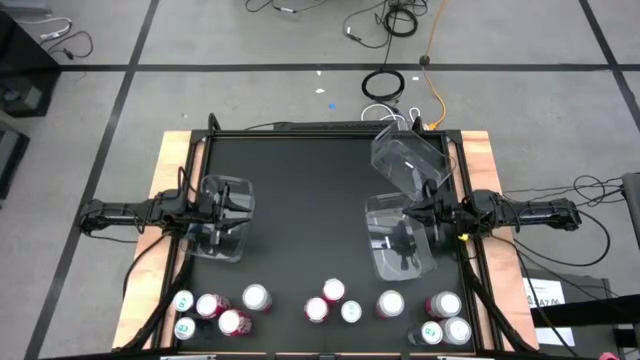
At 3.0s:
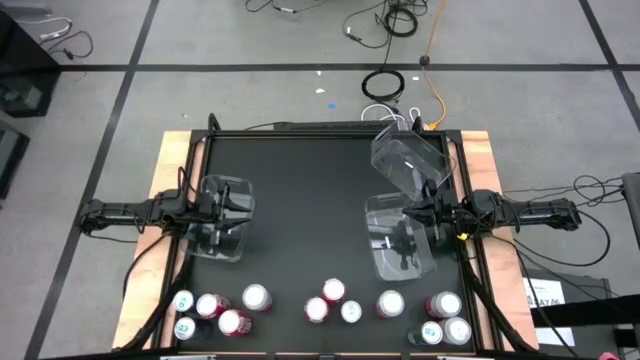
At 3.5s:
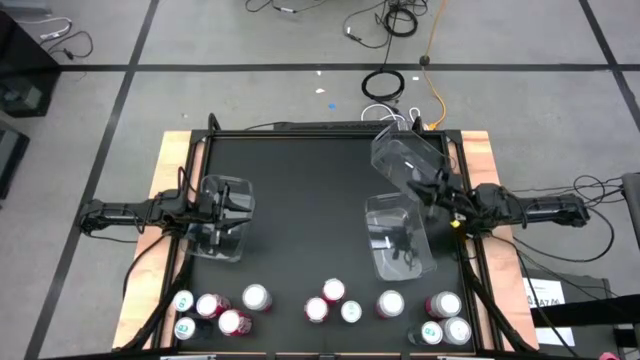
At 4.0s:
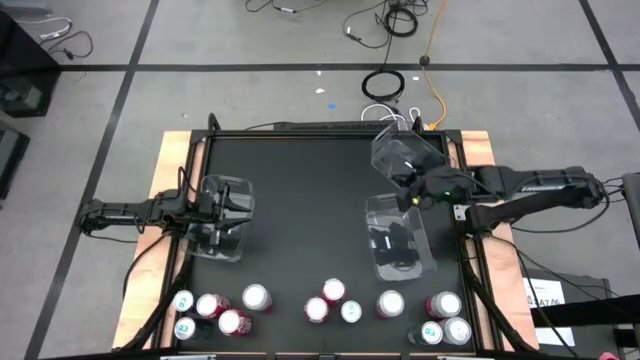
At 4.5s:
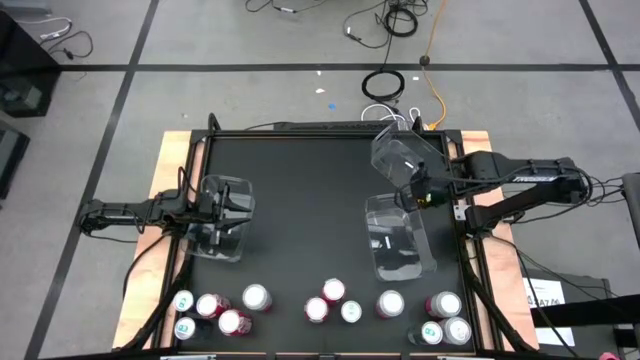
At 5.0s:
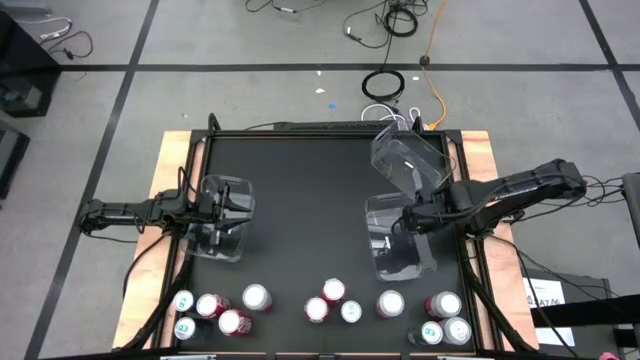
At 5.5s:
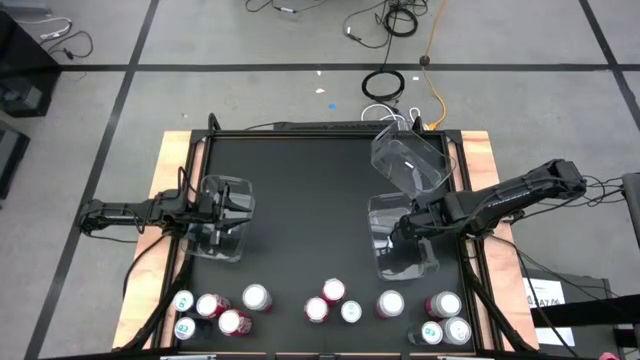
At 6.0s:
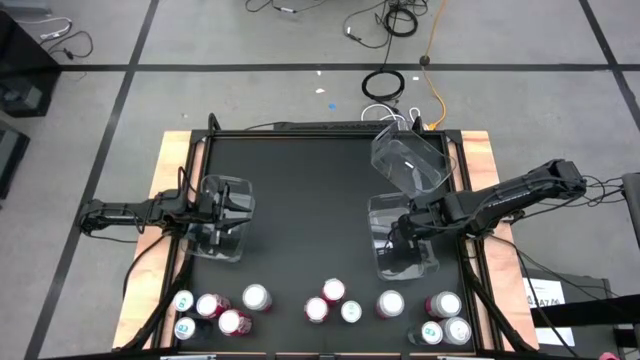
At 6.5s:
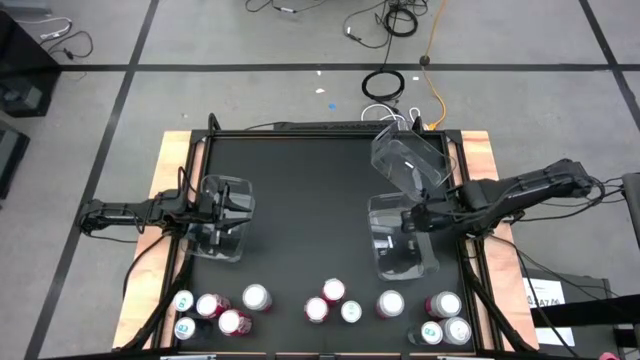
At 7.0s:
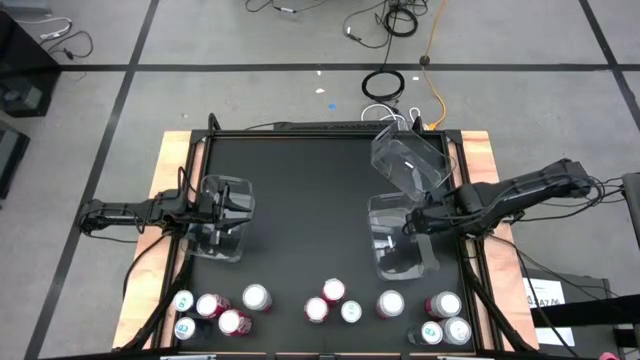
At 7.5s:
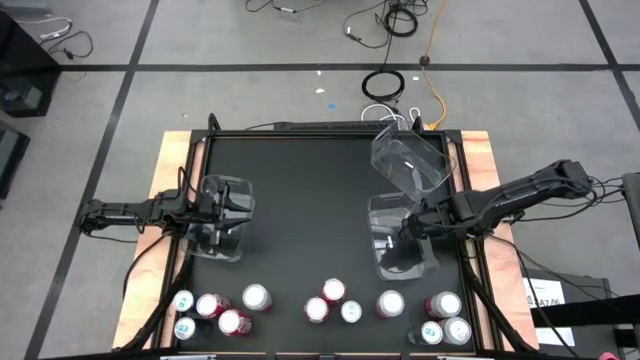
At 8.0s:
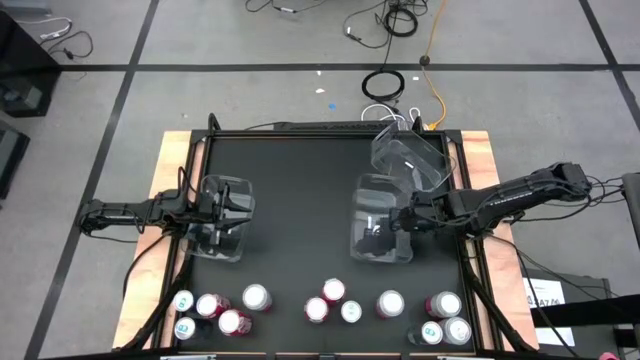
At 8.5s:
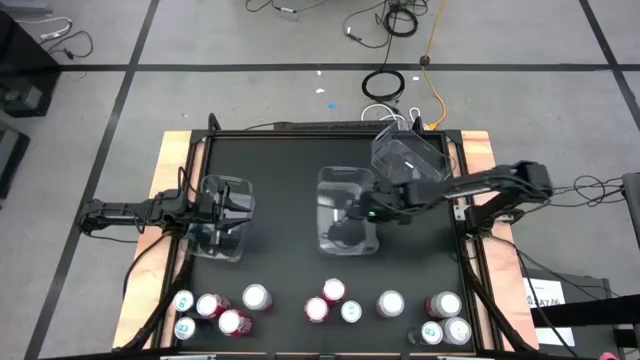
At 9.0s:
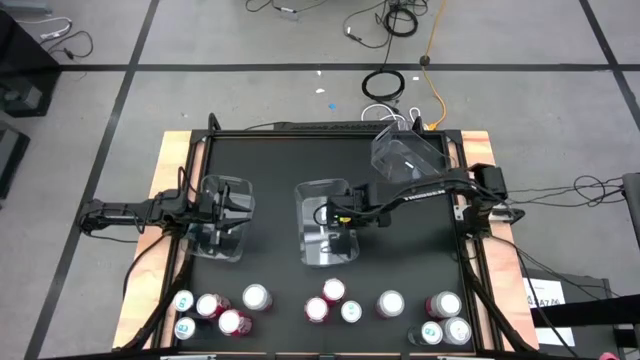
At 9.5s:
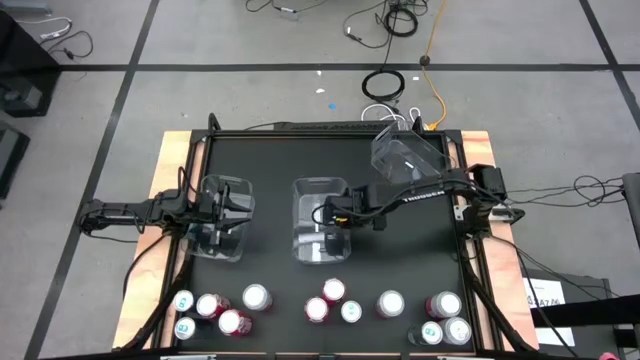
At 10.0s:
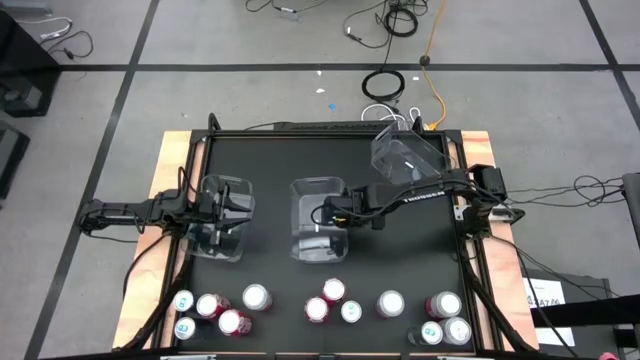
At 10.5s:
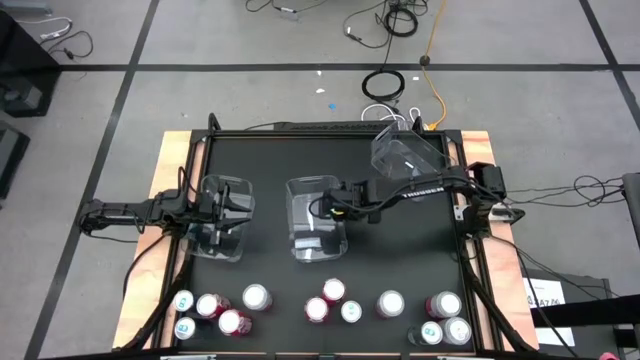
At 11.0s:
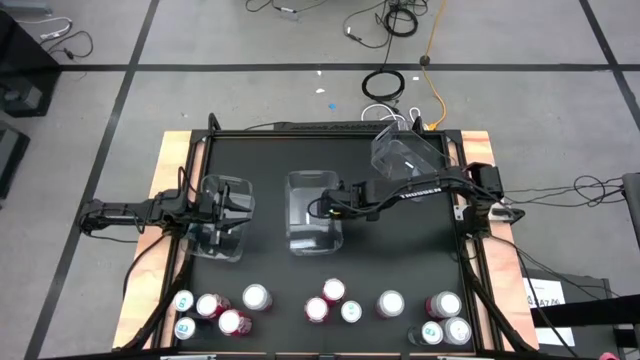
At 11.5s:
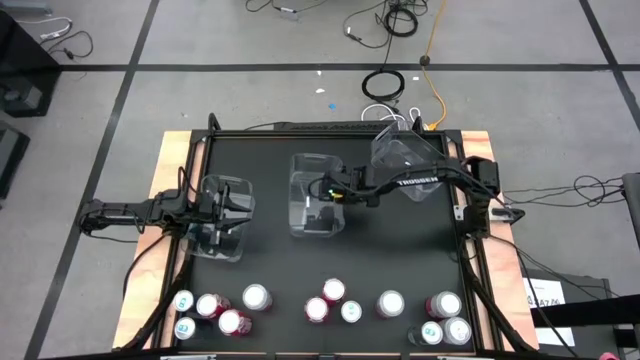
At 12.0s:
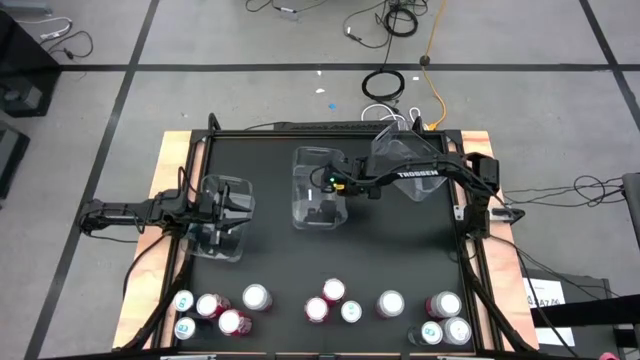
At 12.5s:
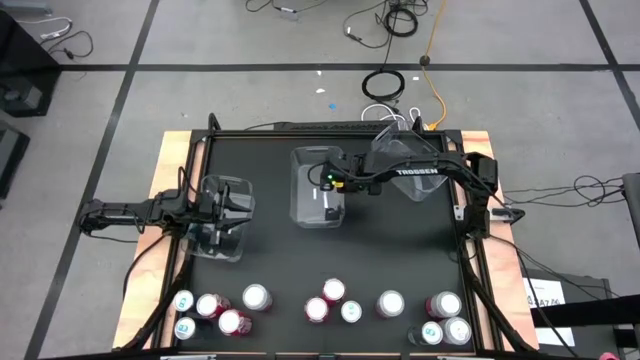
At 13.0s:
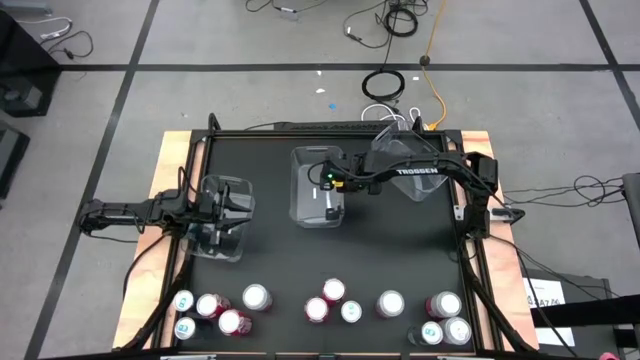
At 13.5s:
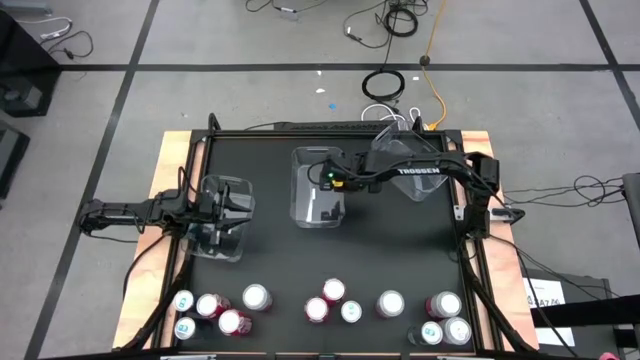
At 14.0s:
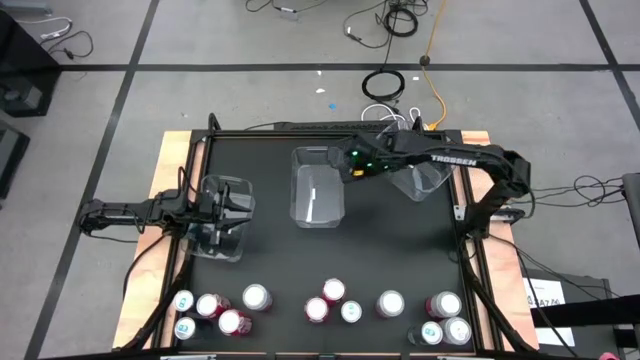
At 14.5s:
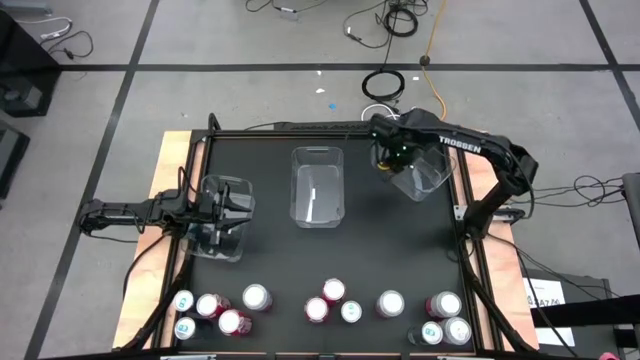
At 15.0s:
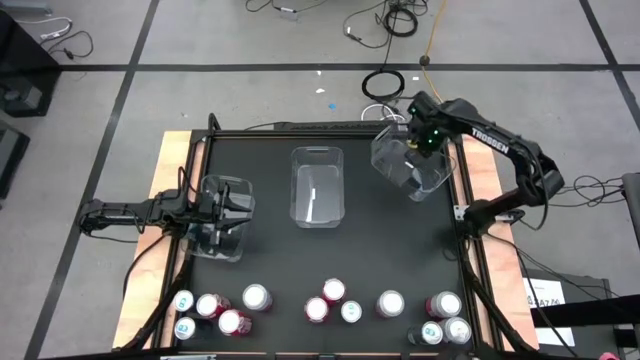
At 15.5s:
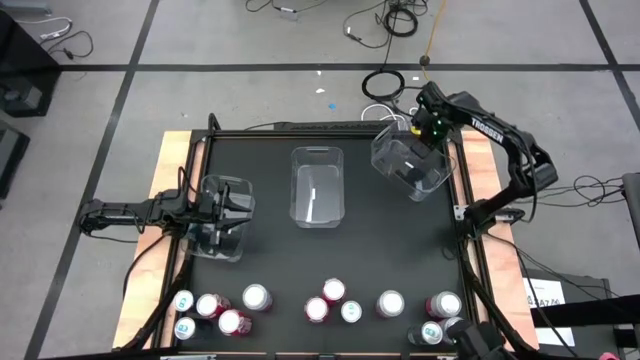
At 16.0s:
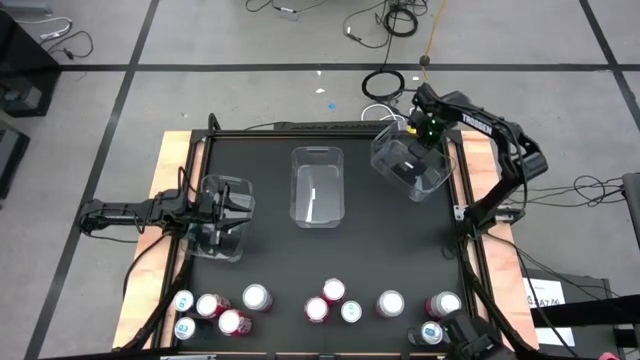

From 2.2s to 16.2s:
Task: Sort soda cans
Move the transparent bins to the top of the table
